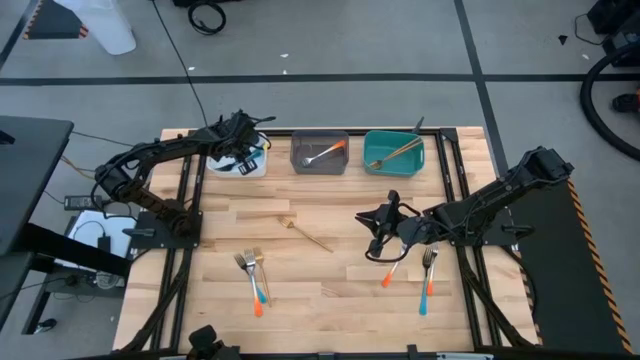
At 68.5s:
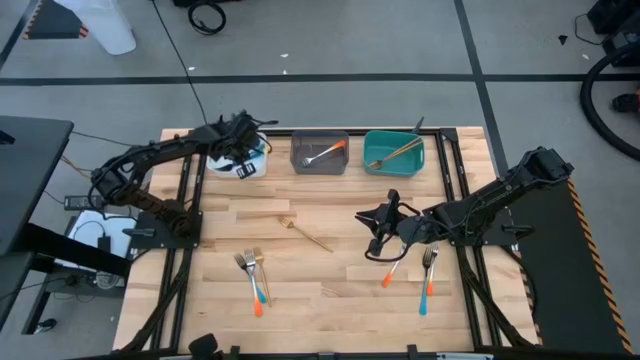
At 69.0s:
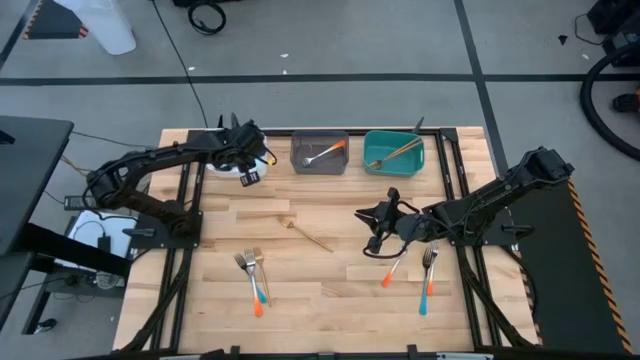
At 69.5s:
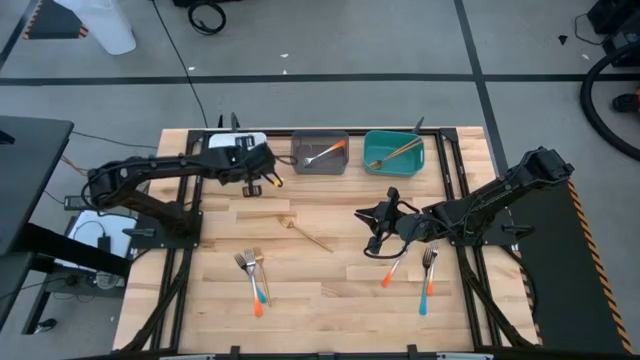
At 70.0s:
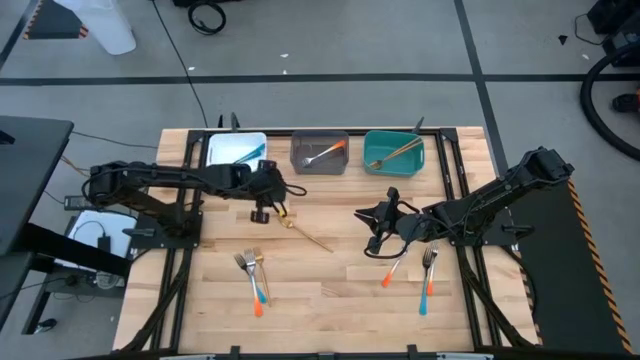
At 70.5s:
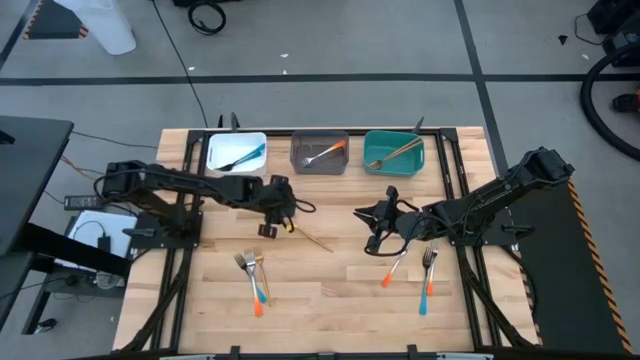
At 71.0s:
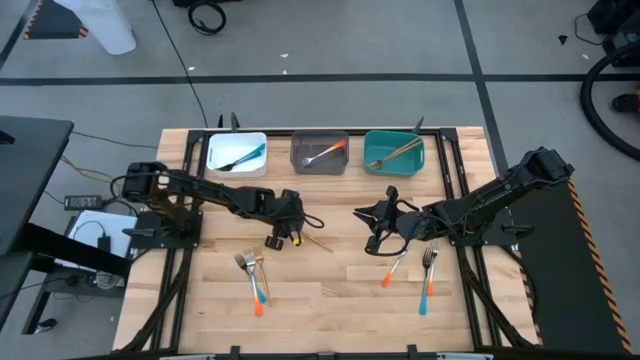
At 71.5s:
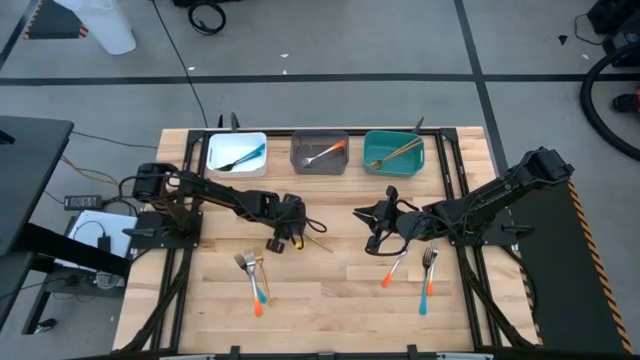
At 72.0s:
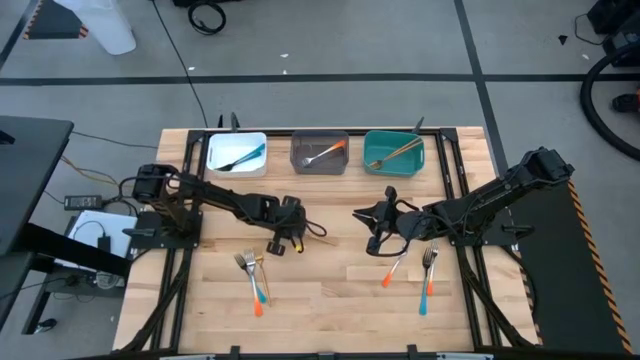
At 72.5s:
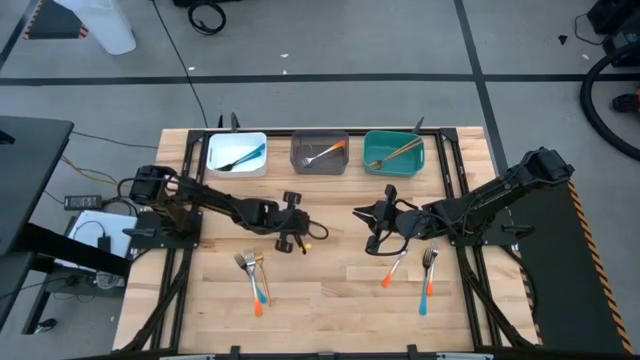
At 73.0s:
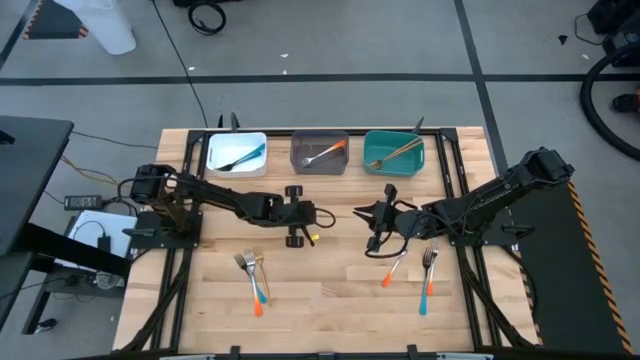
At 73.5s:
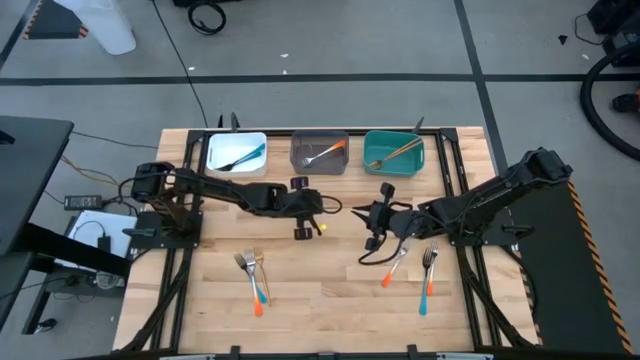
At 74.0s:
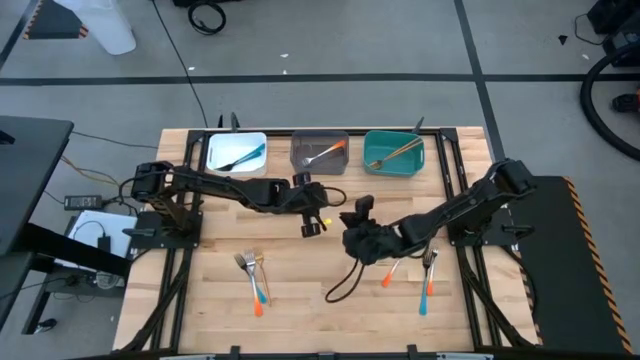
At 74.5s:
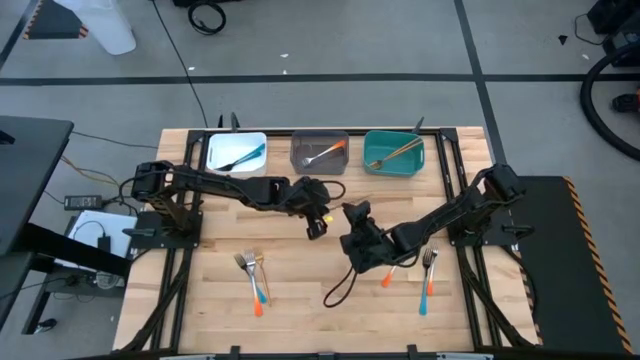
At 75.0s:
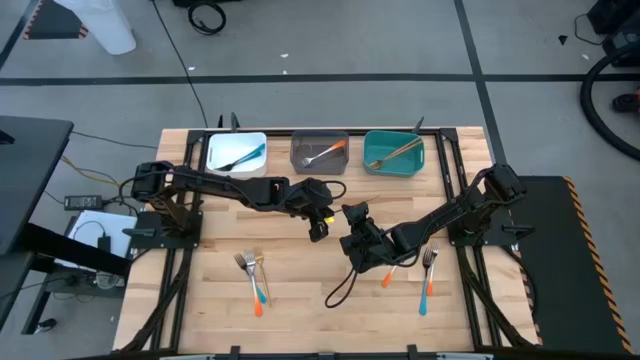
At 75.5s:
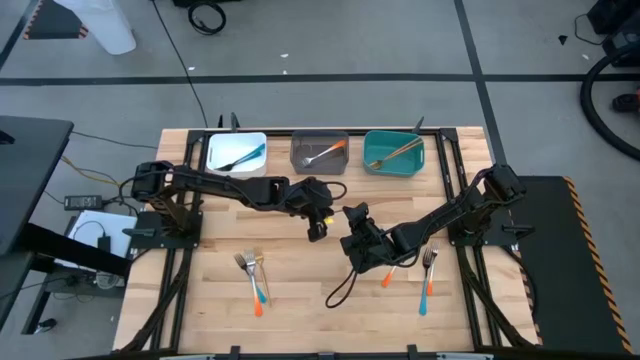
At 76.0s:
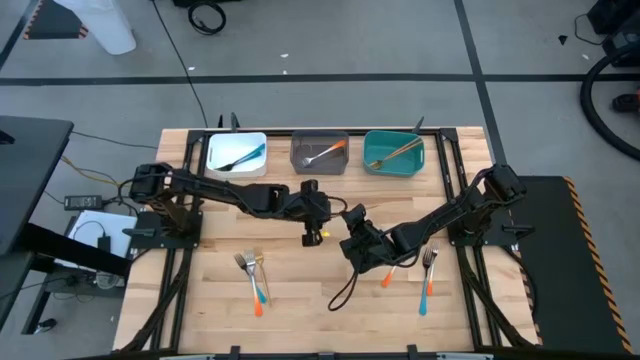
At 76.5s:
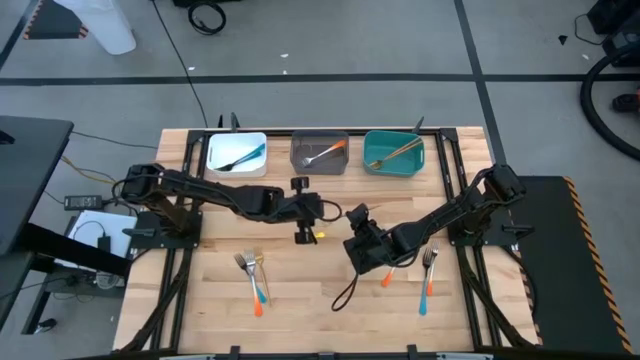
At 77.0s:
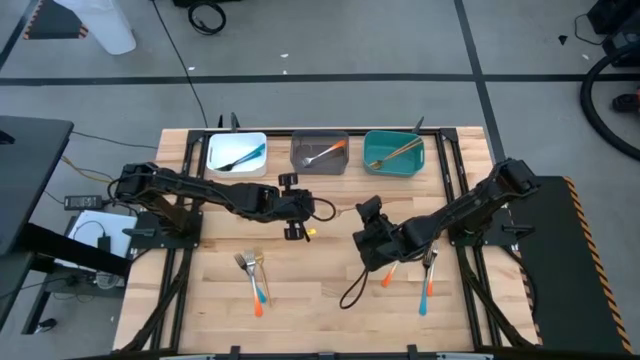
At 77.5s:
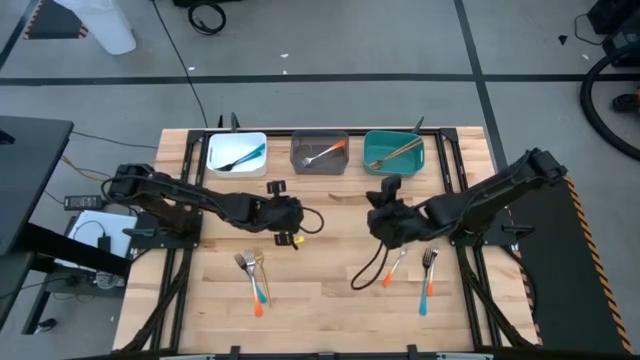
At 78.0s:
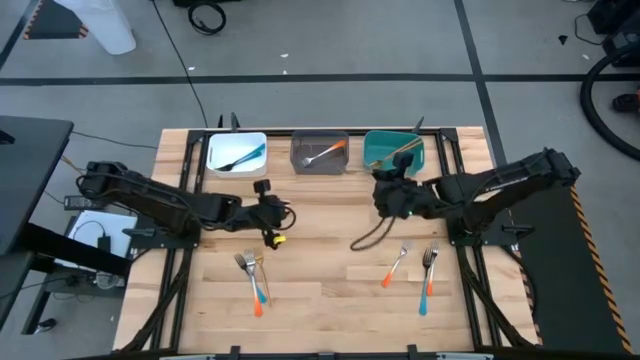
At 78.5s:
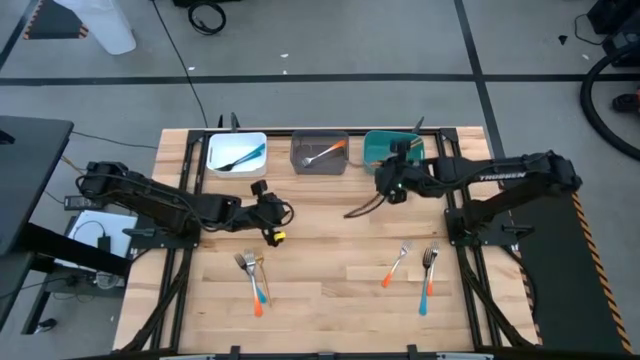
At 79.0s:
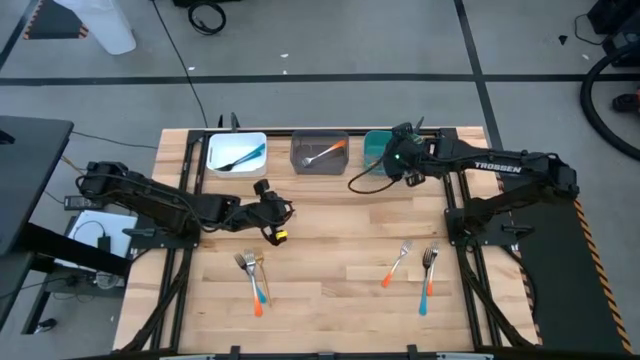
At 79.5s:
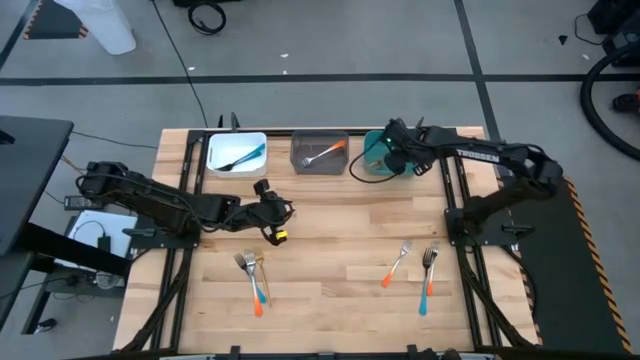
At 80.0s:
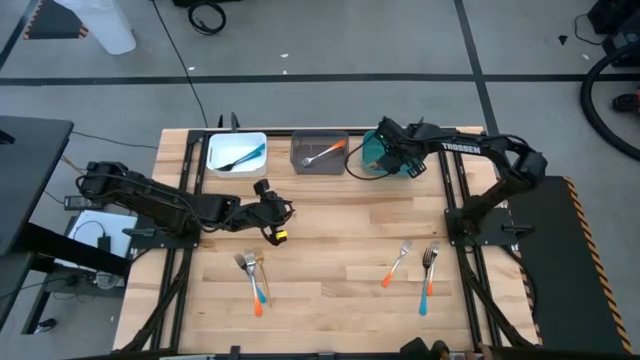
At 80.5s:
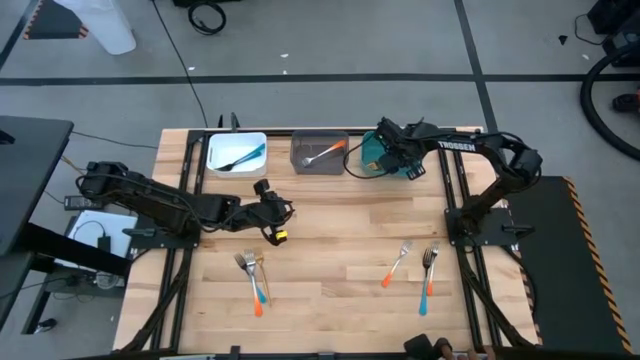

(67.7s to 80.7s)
Task: Sort silverware by color (type)
Put the gold fork into the green bin

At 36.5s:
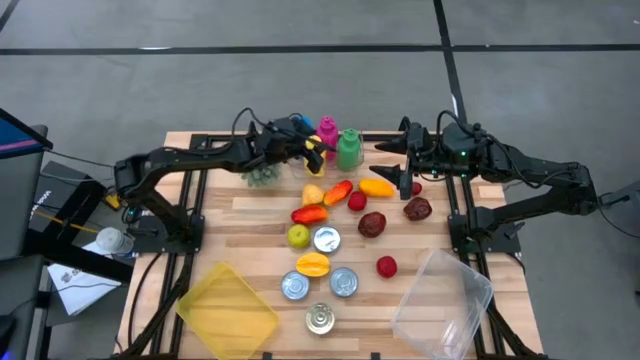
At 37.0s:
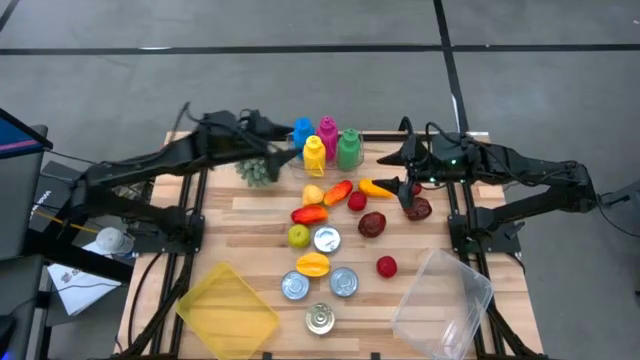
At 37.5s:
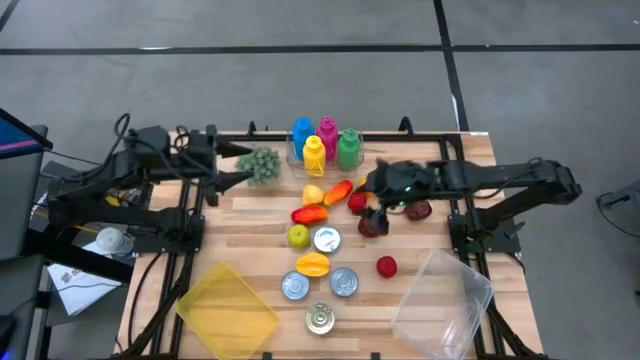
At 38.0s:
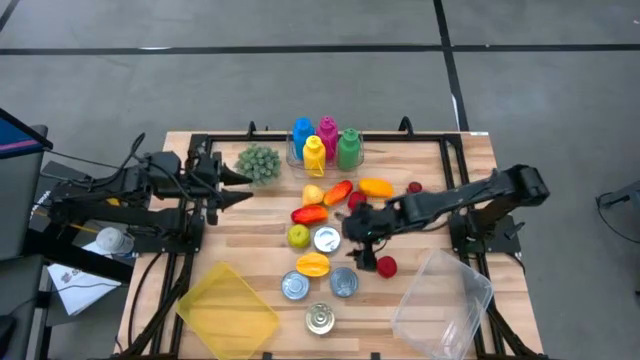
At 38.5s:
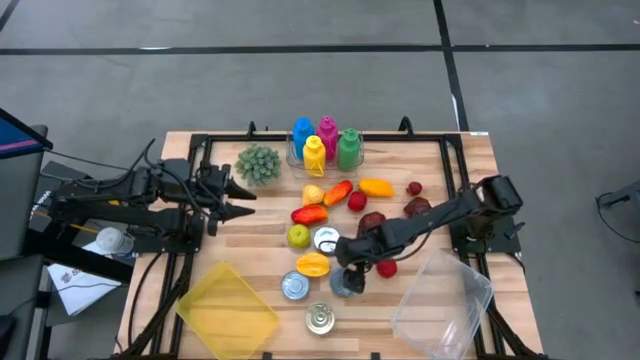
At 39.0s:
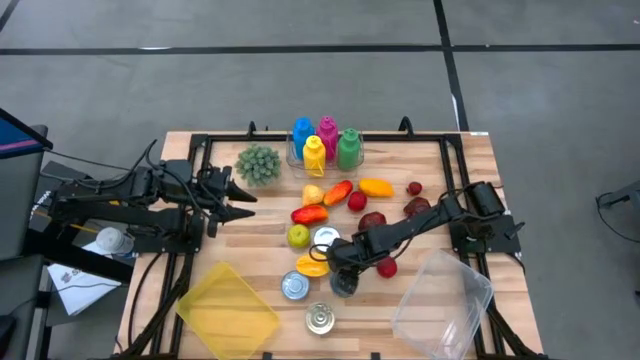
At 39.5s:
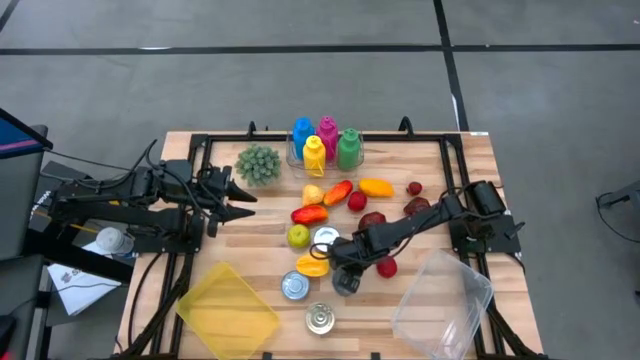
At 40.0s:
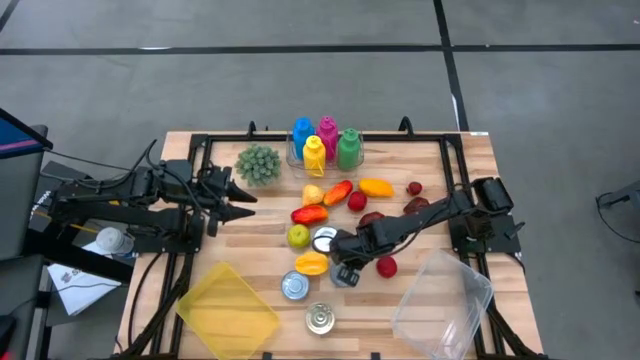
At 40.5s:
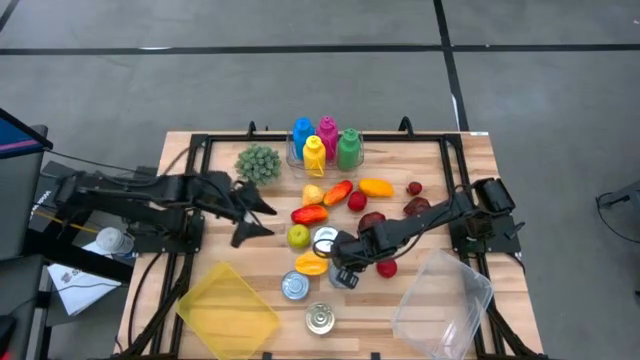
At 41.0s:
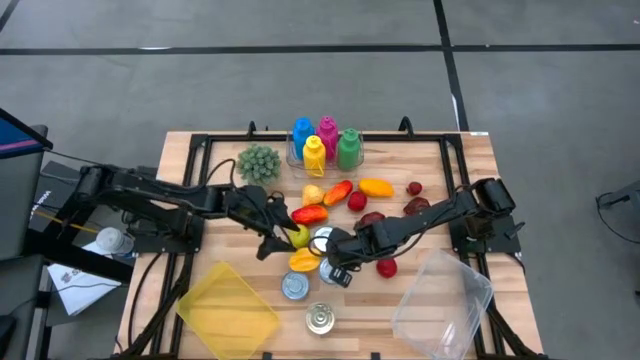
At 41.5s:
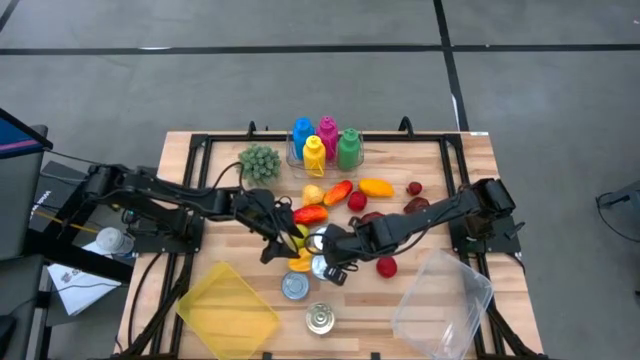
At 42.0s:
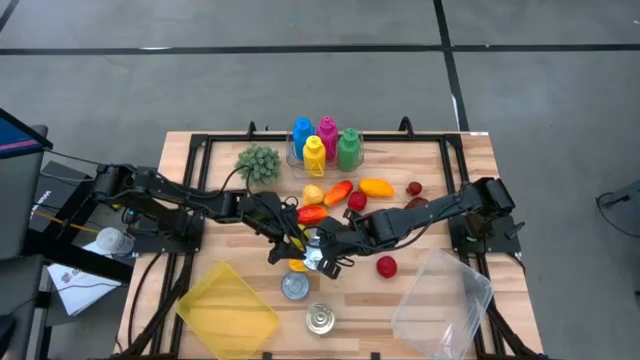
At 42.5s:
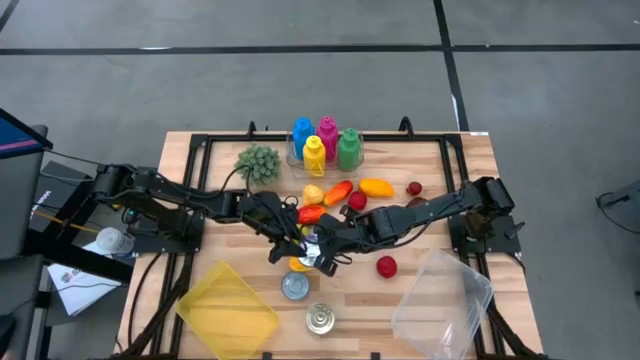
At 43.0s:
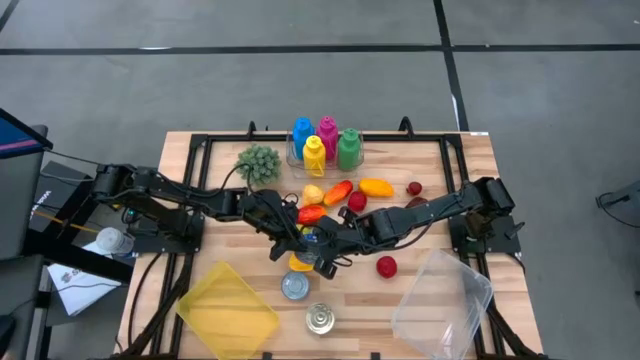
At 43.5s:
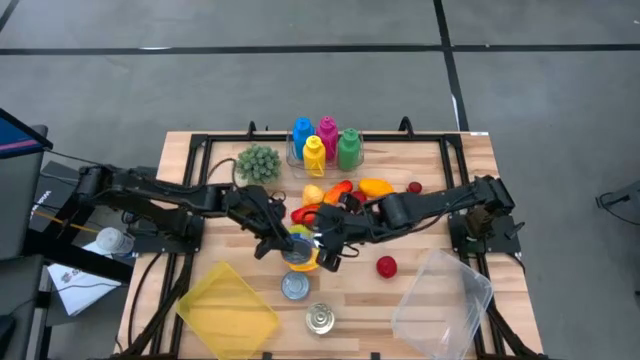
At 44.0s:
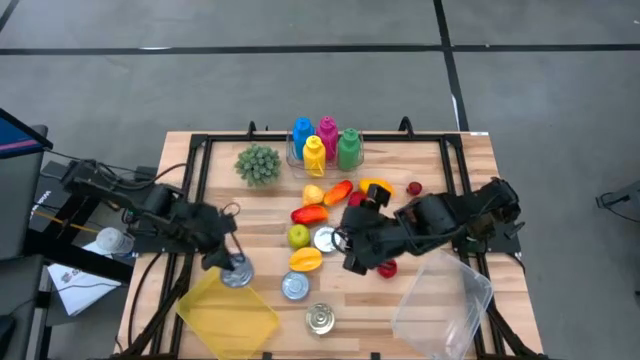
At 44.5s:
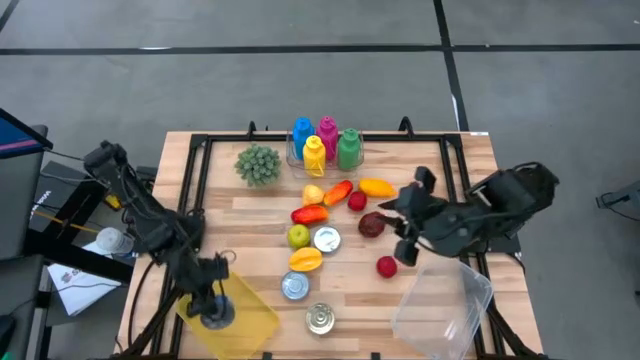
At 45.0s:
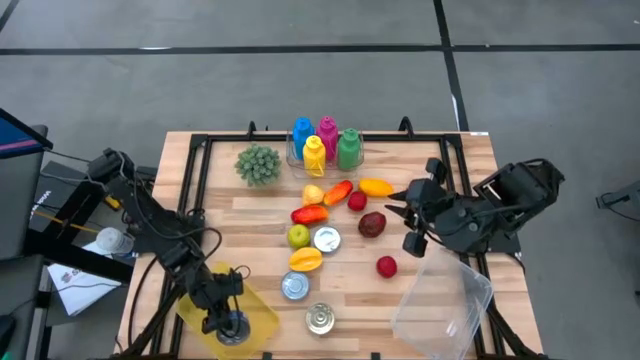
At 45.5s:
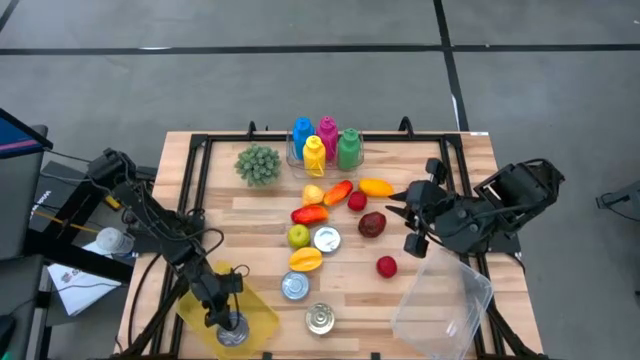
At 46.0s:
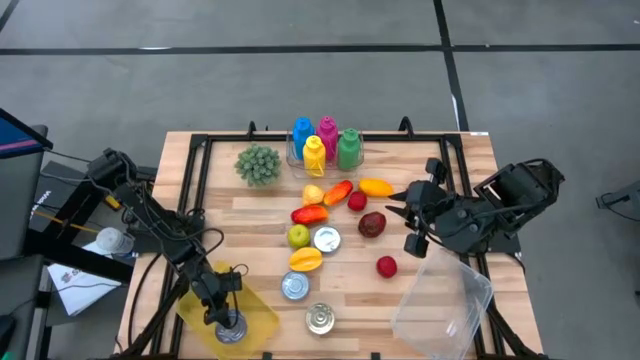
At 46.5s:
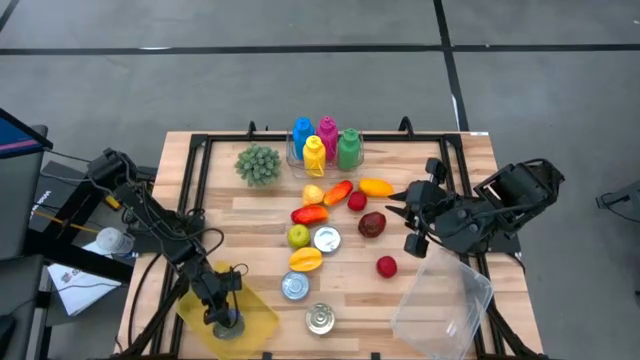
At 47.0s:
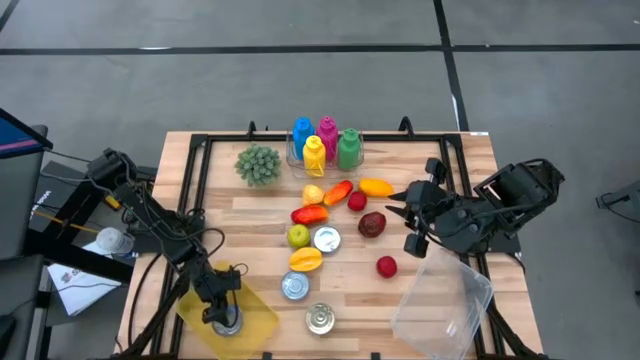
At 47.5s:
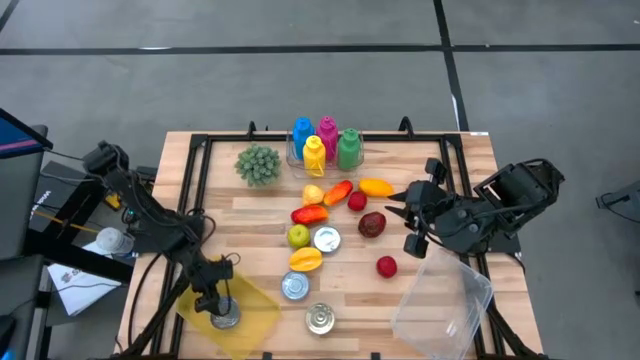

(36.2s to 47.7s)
Task: Pick & Place Food Item
Put the blue tuna can into the yellow bin
